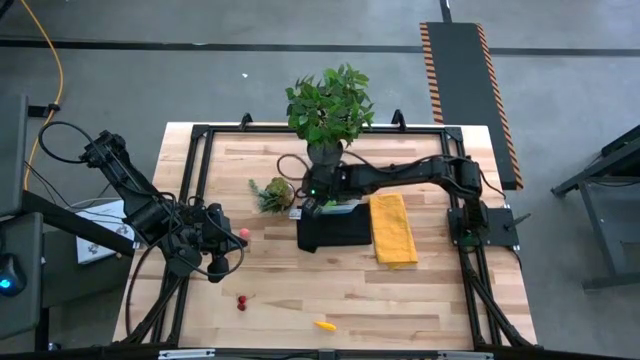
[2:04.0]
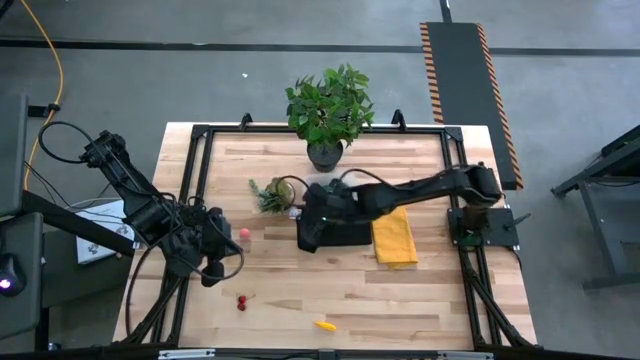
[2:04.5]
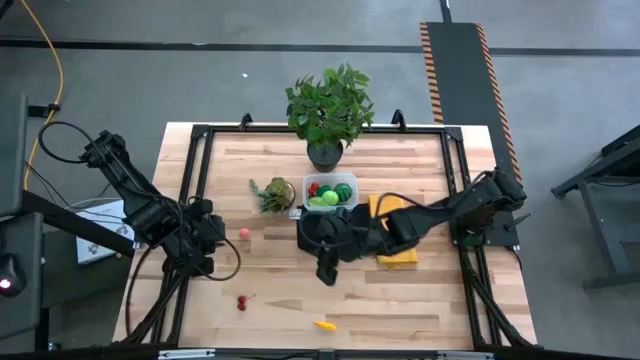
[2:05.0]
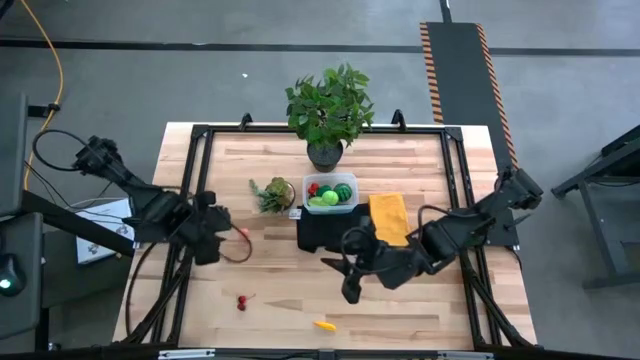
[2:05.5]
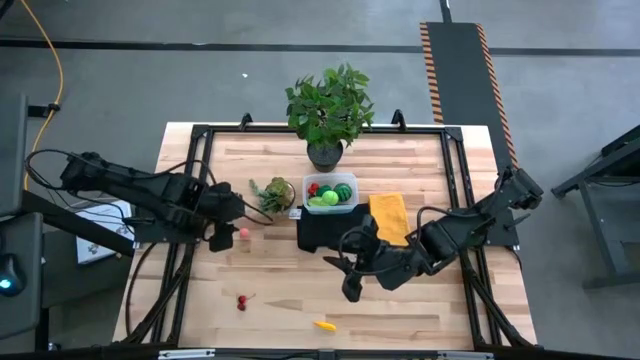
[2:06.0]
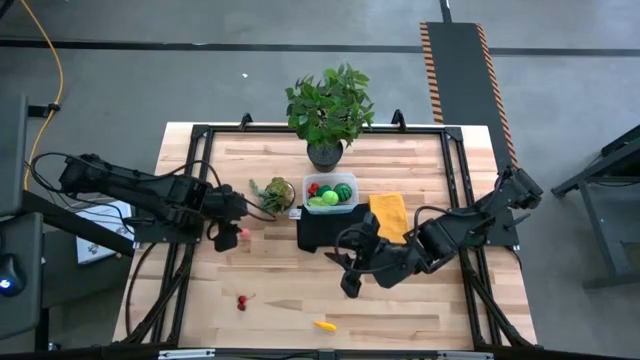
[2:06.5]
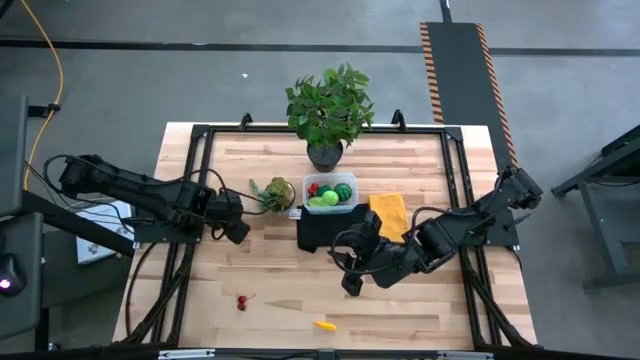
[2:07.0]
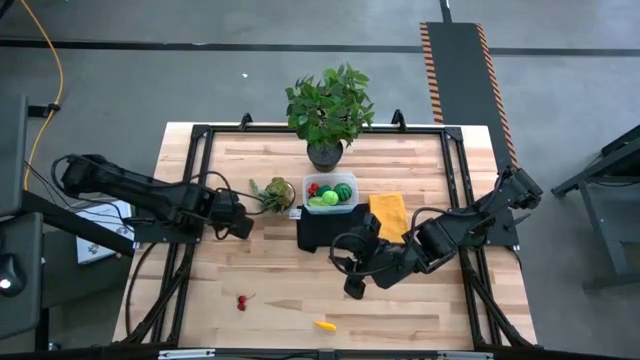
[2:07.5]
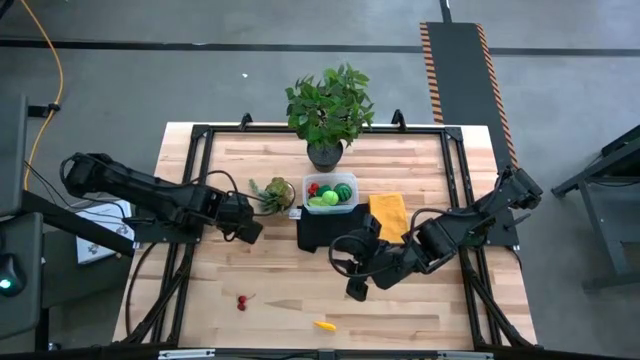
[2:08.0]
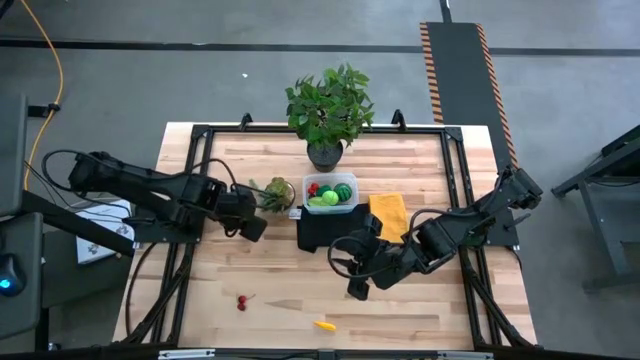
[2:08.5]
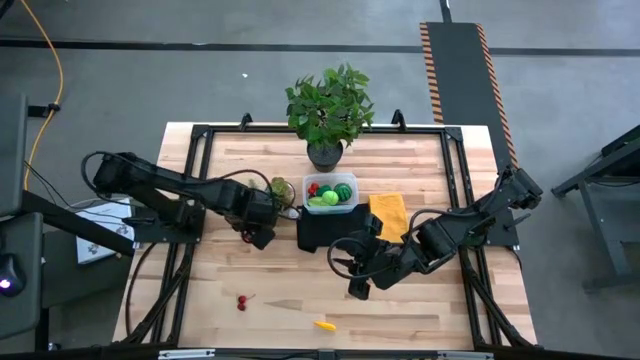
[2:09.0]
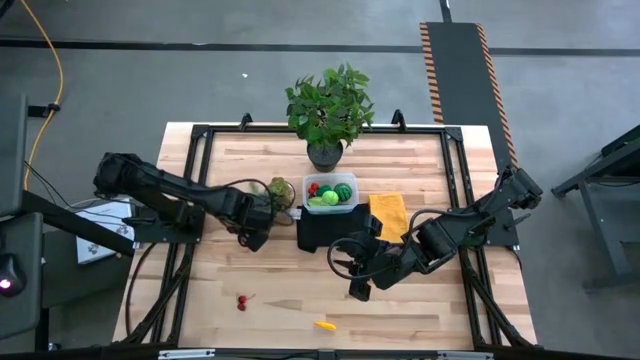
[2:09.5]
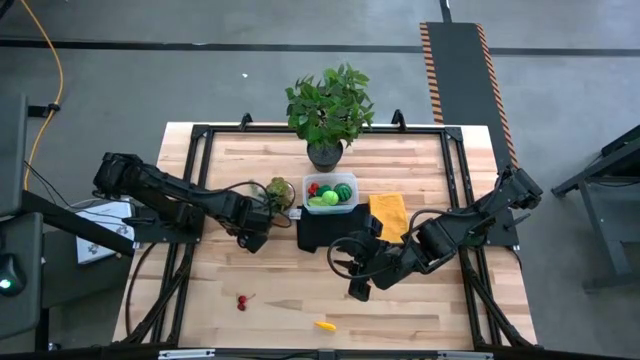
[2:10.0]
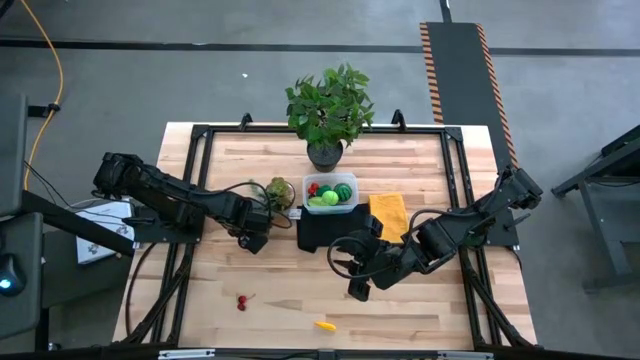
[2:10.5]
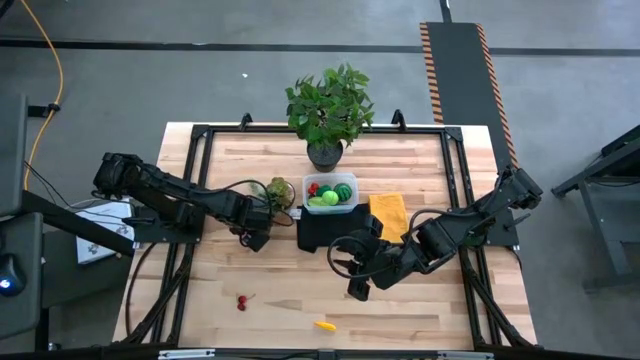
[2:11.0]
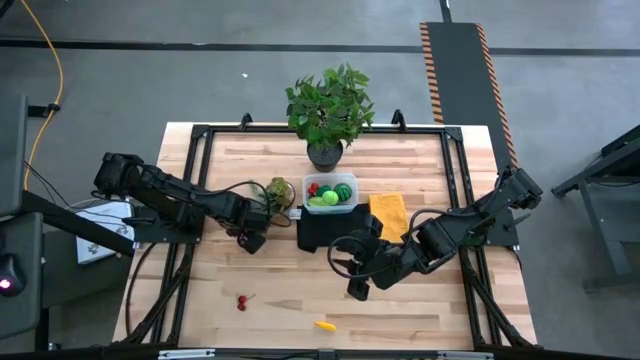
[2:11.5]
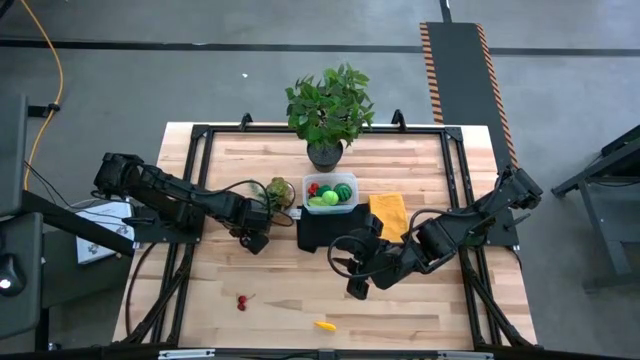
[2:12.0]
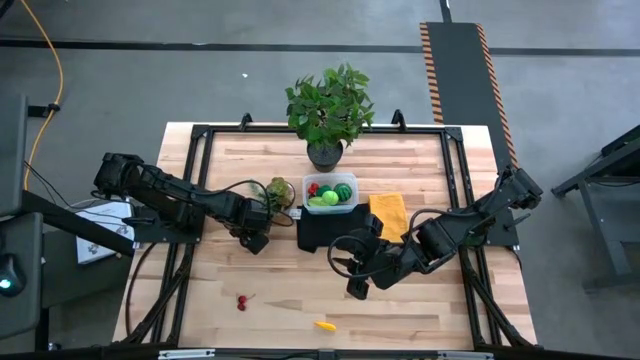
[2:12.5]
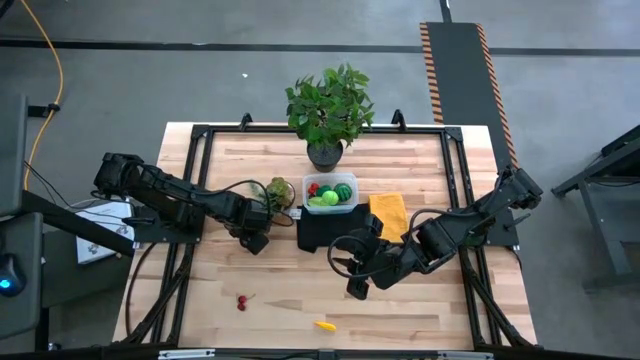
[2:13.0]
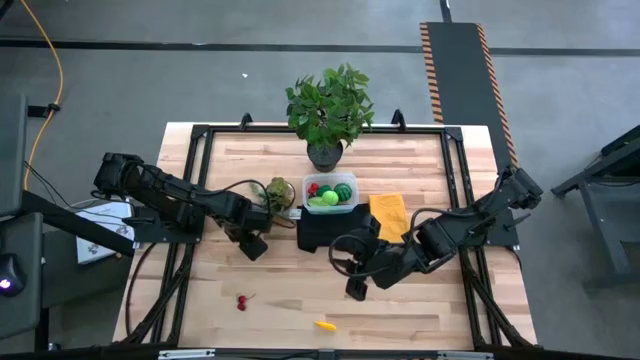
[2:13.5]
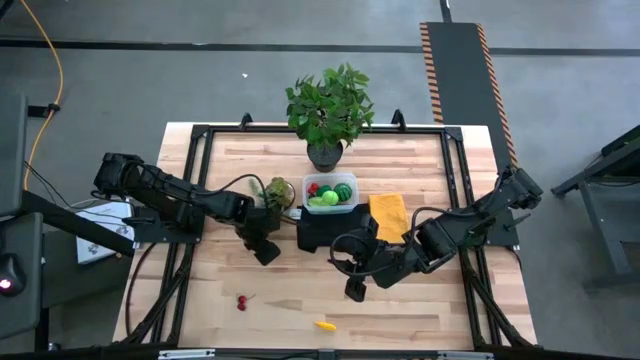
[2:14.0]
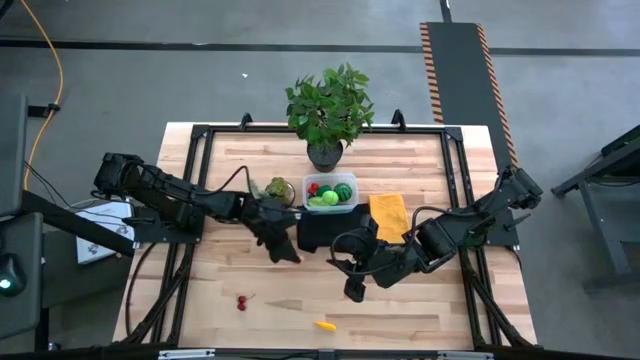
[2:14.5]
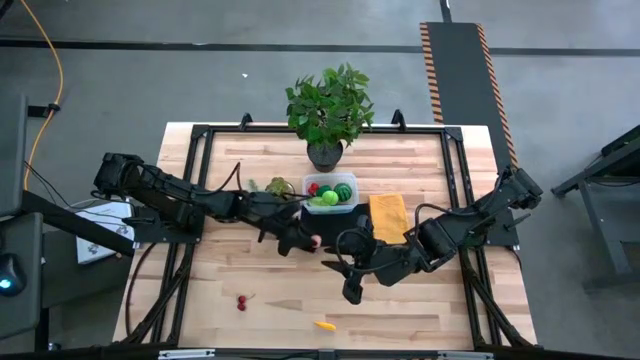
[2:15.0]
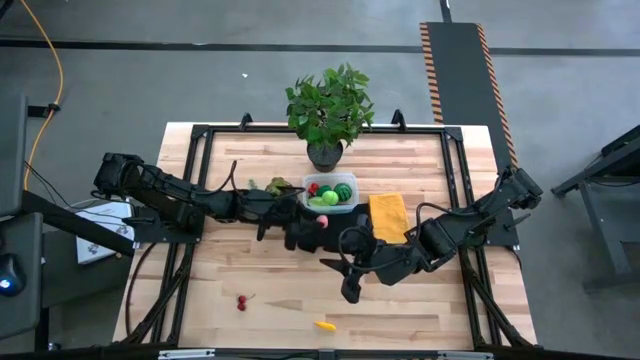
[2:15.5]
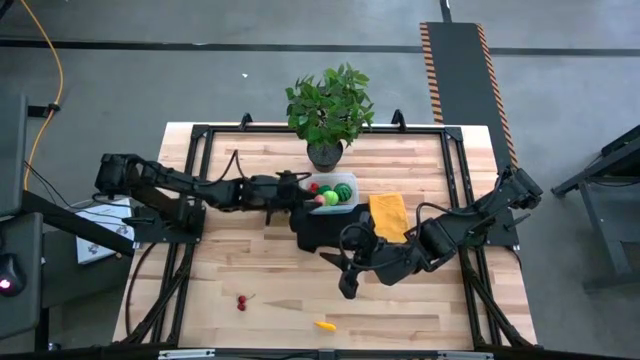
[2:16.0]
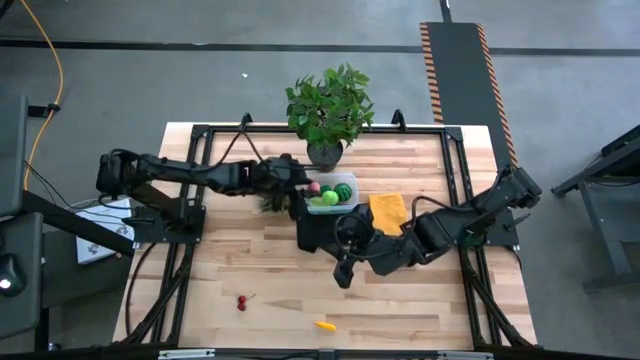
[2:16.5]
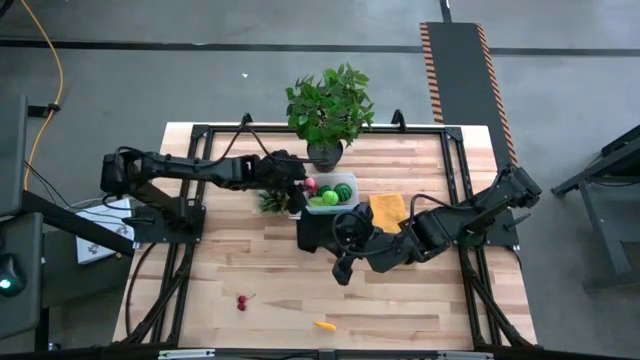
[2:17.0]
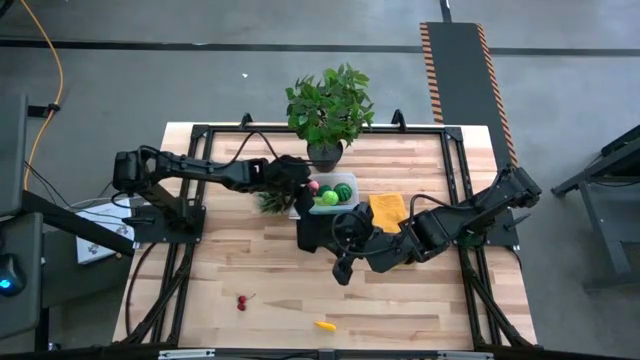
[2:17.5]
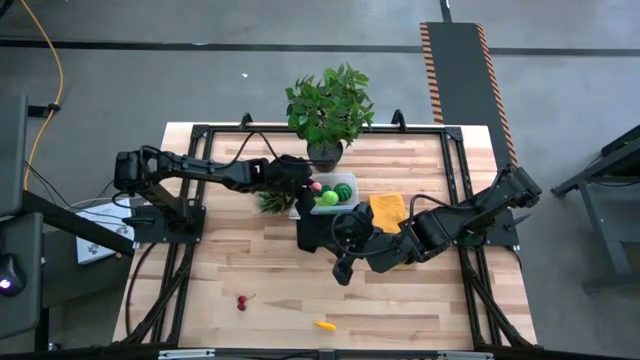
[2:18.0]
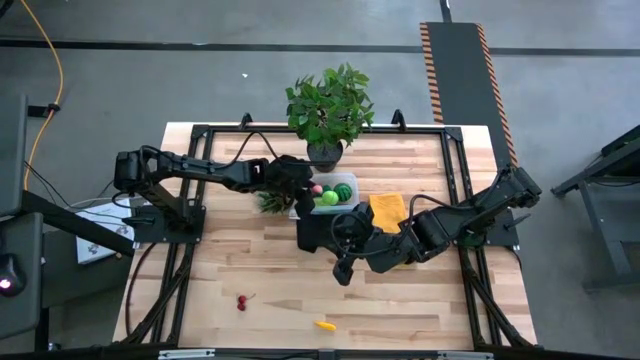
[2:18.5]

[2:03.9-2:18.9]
Task: Pick and placing Produce into tupperware
Put the peach into the transparent bin

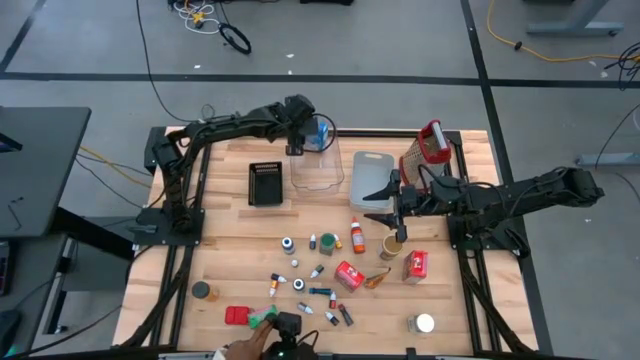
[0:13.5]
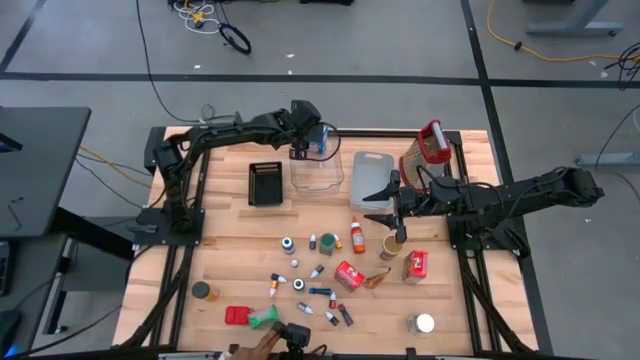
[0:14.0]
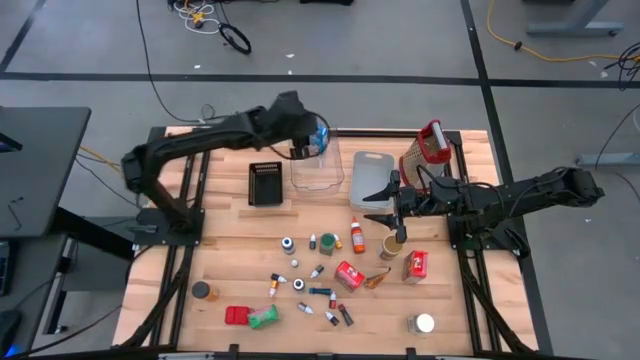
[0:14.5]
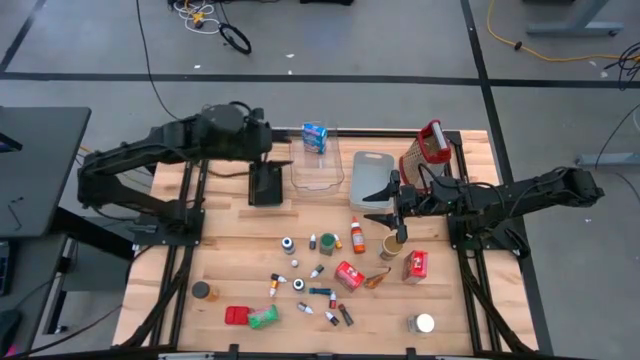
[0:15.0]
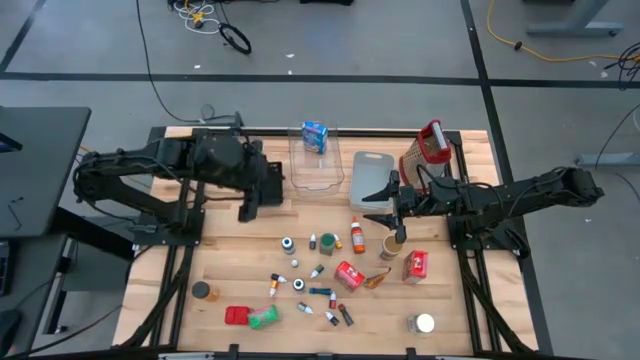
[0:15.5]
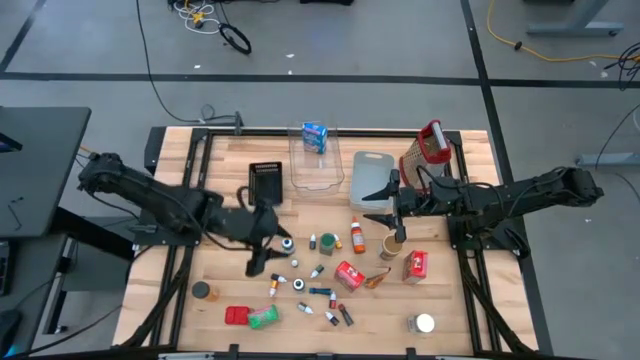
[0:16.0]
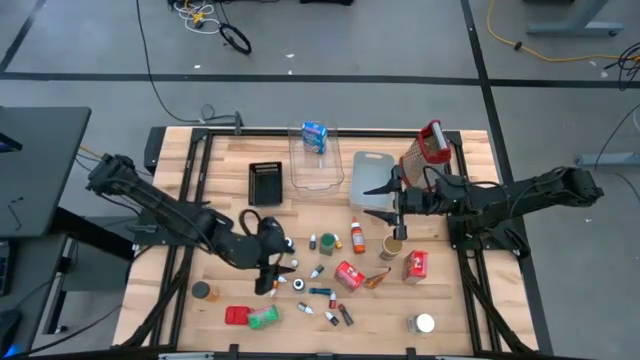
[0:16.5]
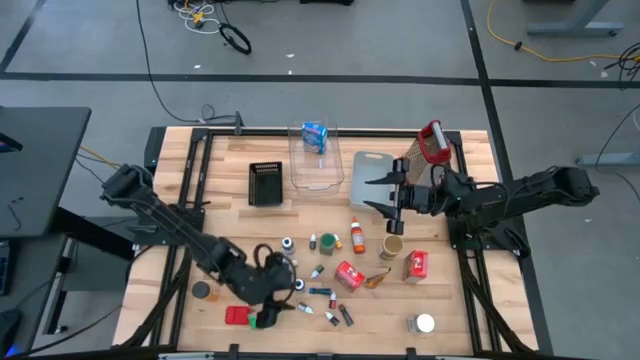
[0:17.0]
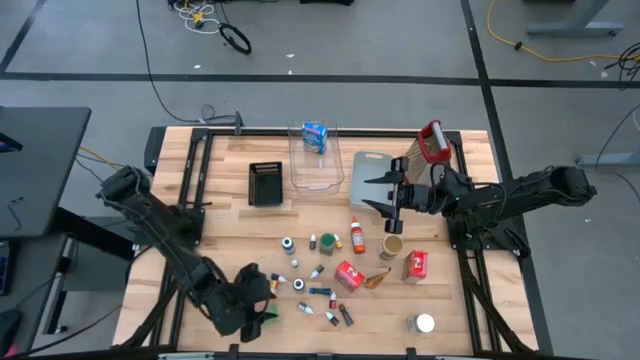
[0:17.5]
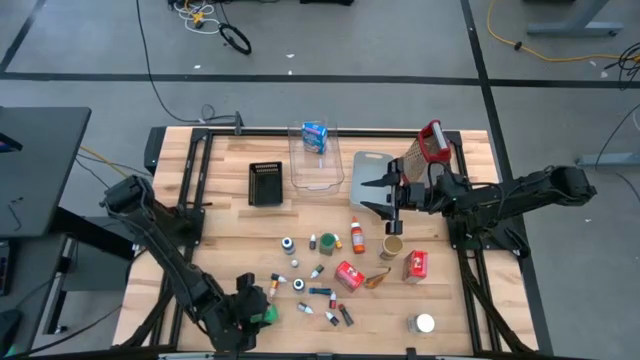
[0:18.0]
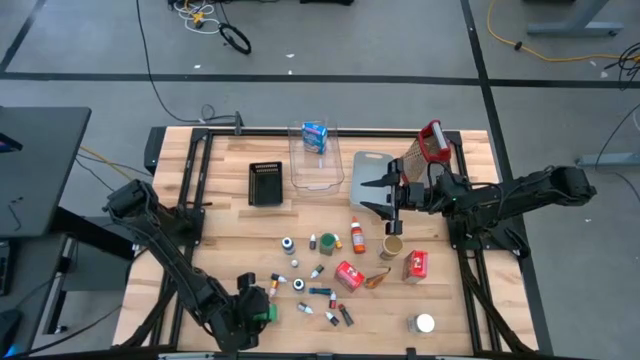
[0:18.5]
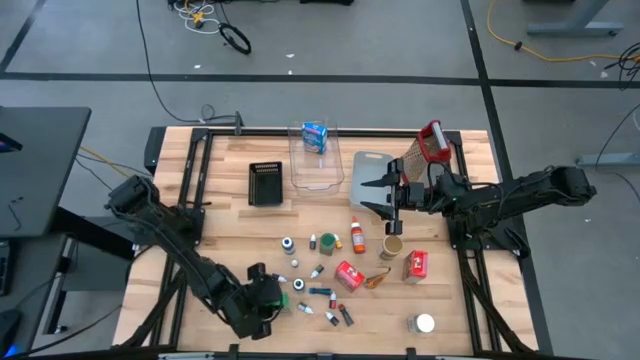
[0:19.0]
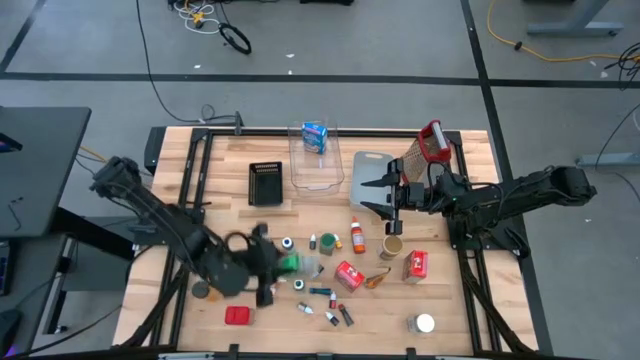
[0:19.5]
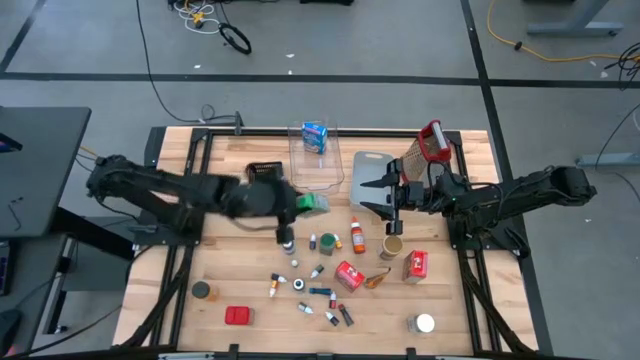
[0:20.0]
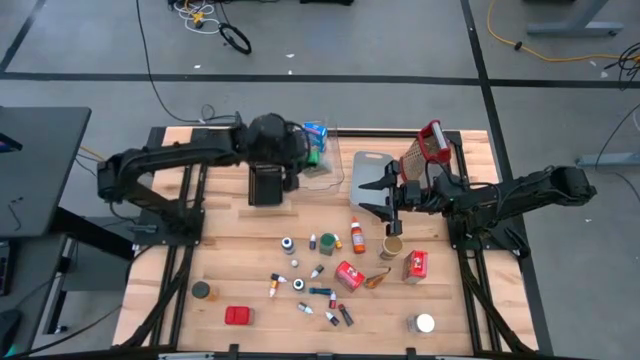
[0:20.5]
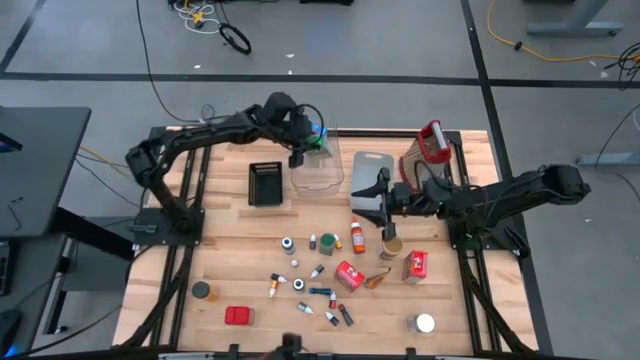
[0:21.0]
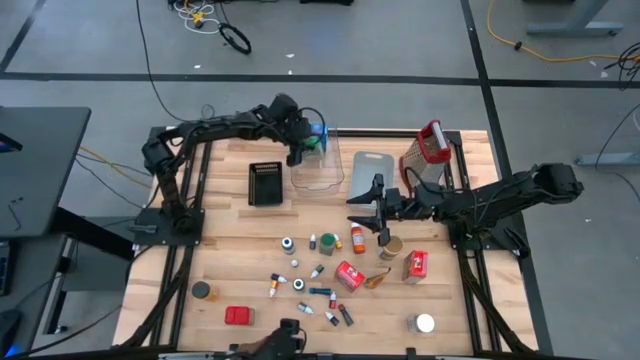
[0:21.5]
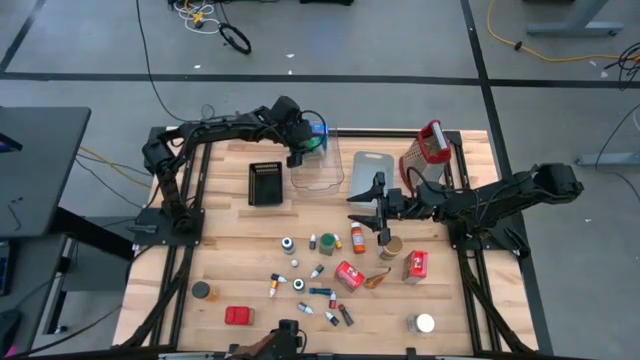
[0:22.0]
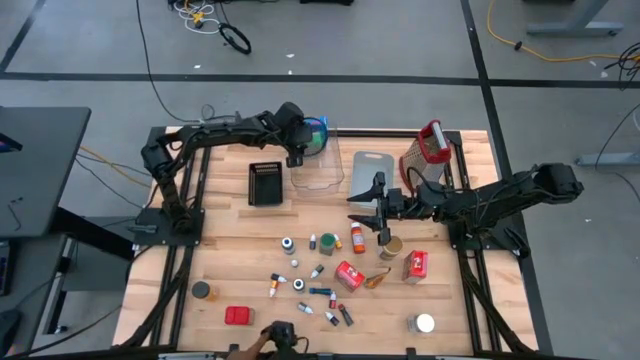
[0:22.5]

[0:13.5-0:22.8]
Task: Pick & Place Kitchen Items
Put the green cereal box into the transparent bin
